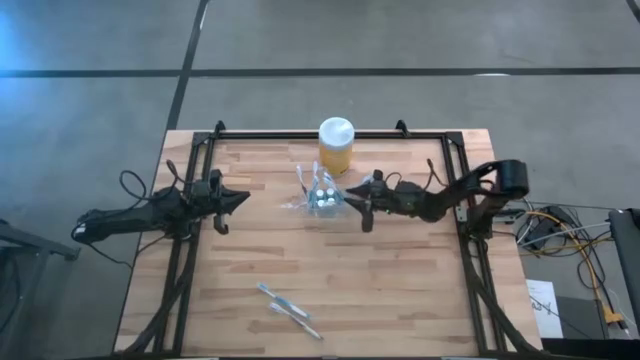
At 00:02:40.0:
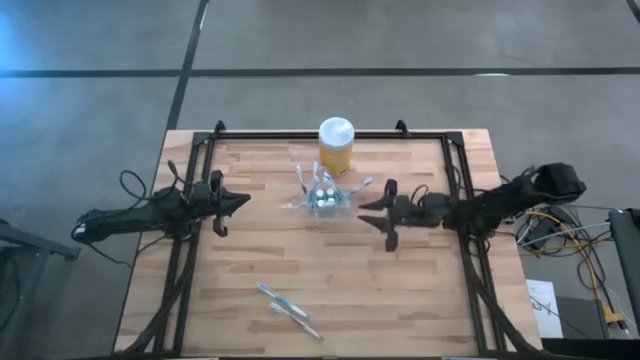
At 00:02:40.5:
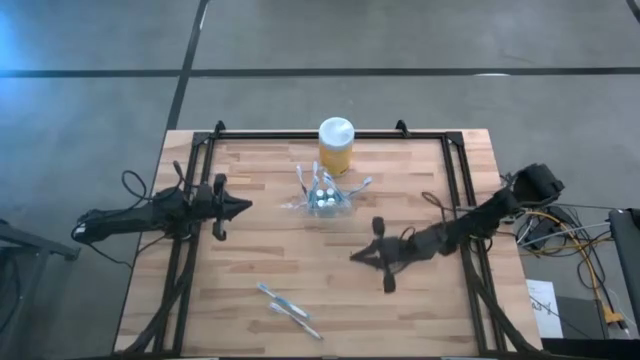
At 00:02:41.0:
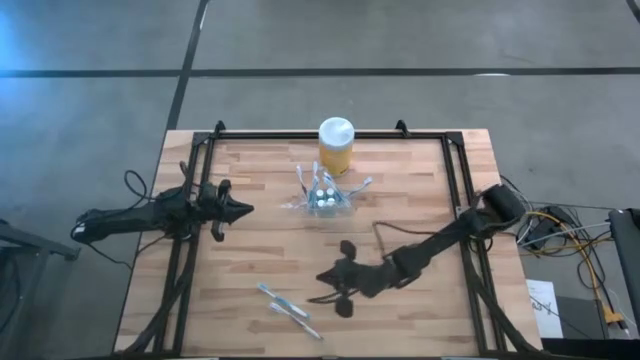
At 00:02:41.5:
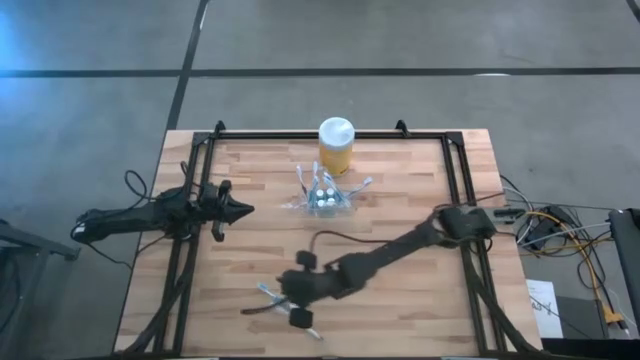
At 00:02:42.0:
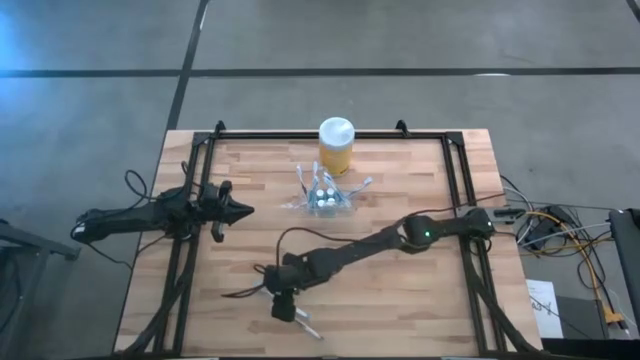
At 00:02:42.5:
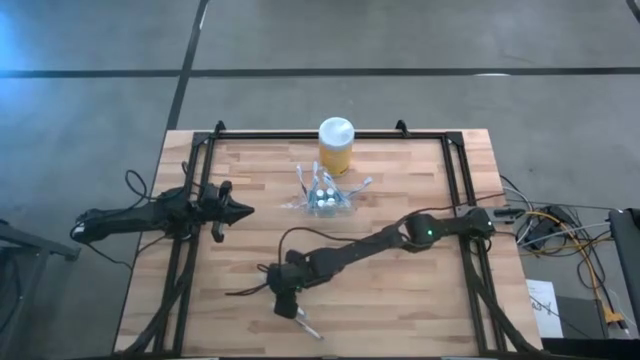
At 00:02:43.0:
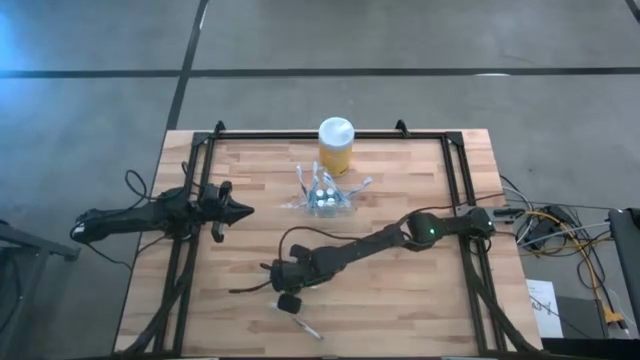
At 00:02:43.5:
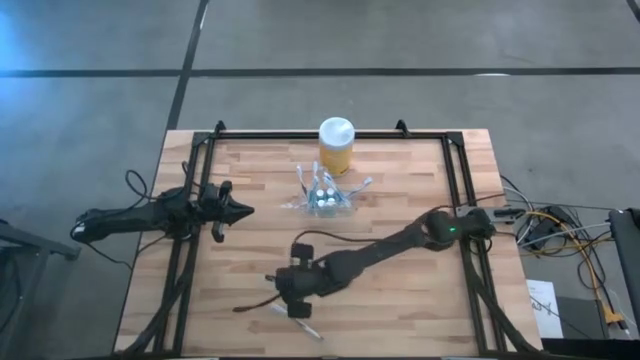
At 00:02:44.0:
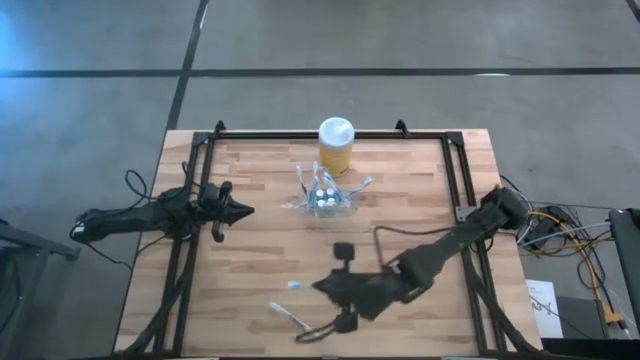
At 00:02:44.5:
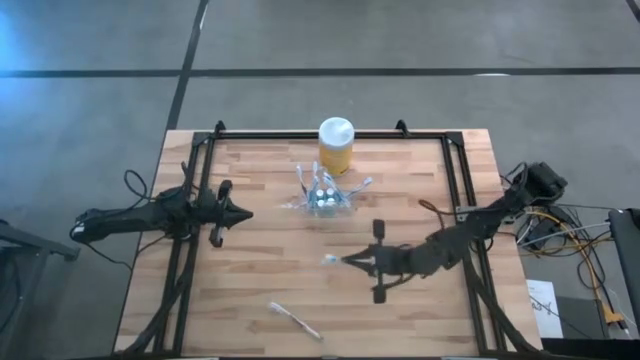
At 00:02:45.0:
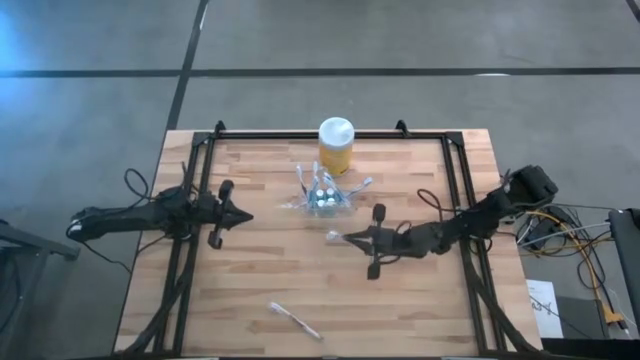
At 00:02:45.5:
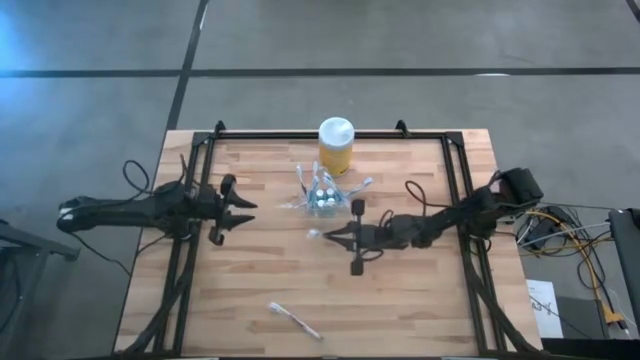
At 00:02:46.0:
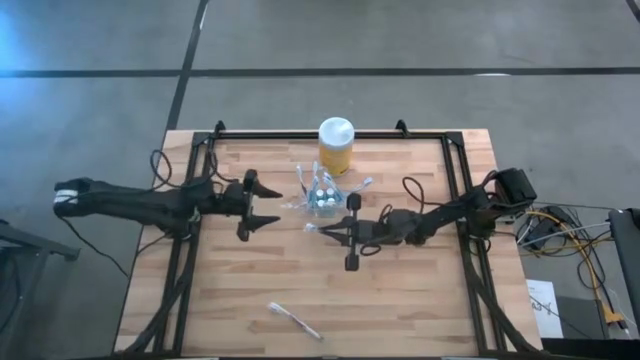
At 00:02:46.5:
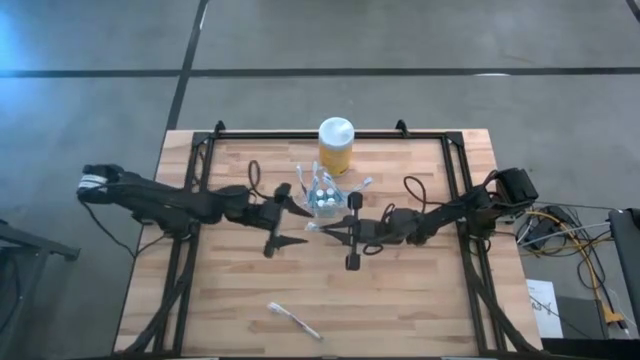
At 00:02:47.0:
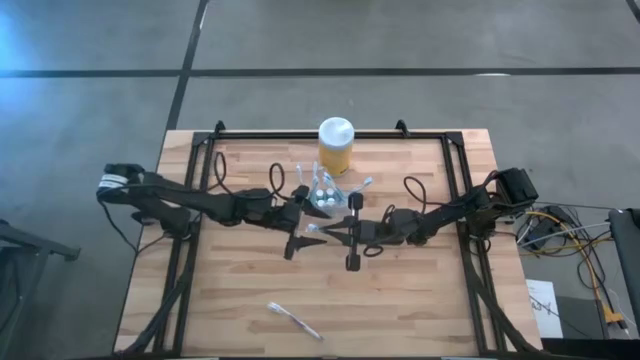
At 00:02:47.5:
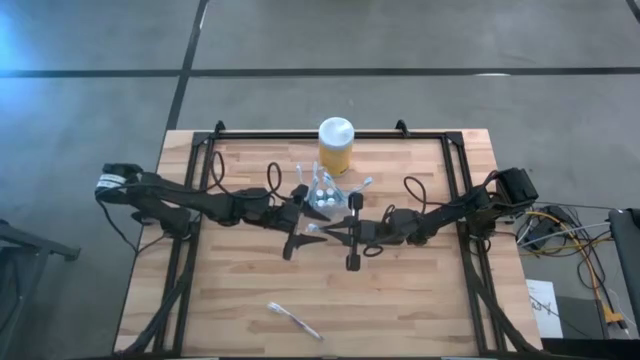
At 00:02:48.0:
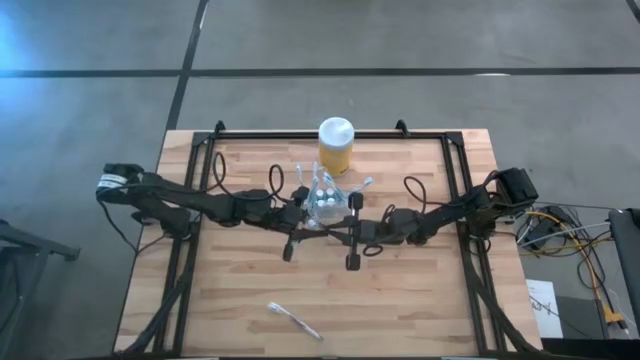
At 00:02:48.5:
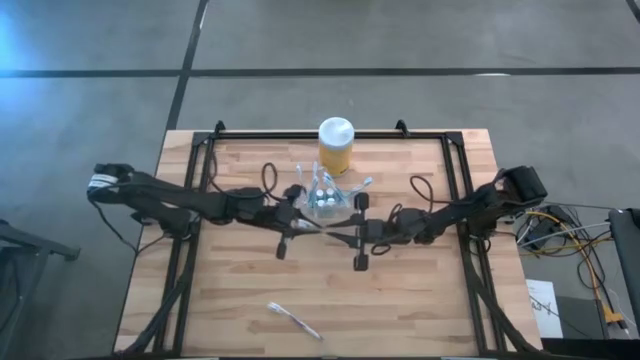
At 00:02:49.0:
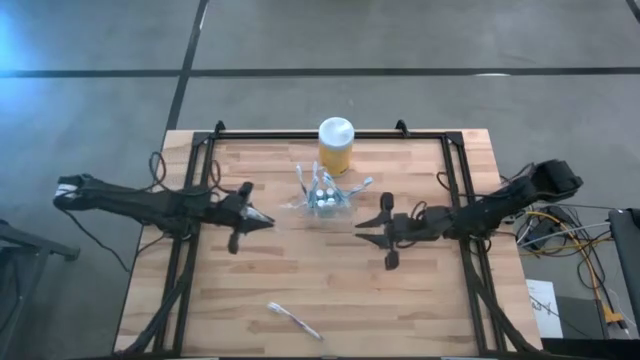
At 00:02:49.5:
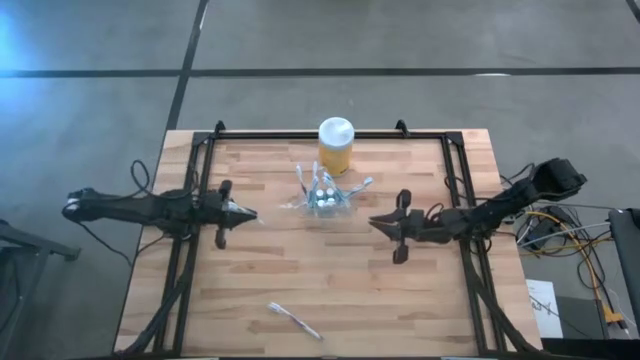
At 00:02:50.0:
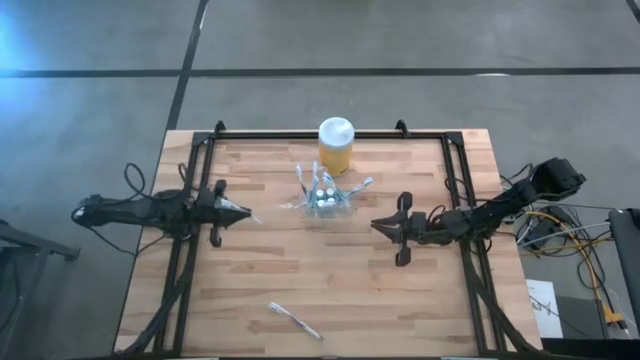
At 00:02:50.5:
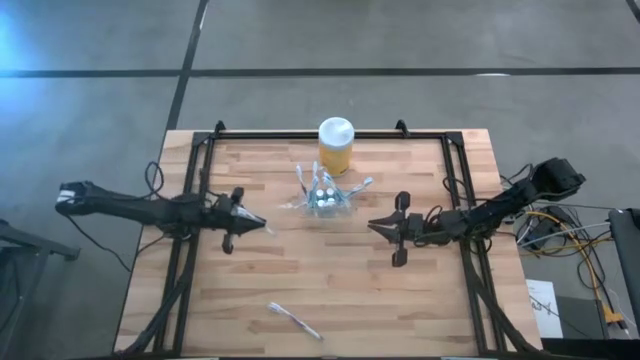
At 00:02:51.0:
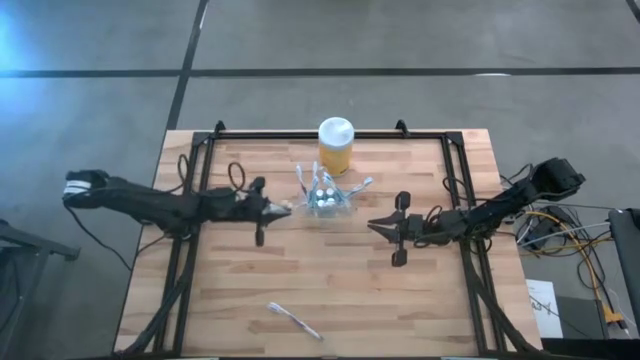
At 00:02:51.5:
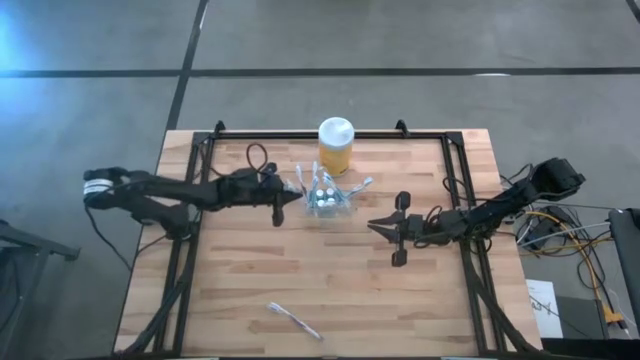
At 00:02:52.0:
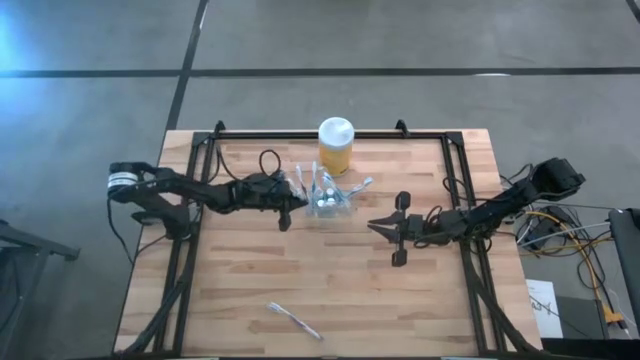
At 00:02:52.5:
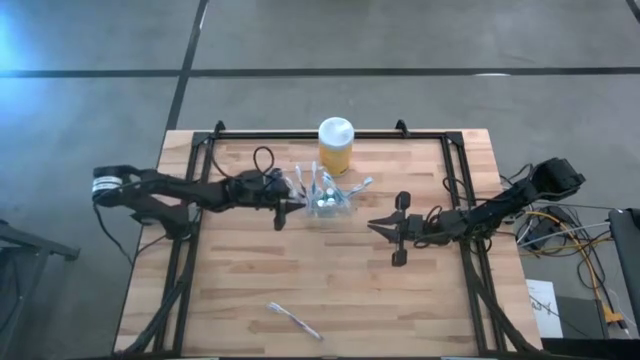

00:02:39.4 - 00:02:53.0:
Task: Pick & Place toothbrushing station
Put the blue toothbrush into the transparent organizer

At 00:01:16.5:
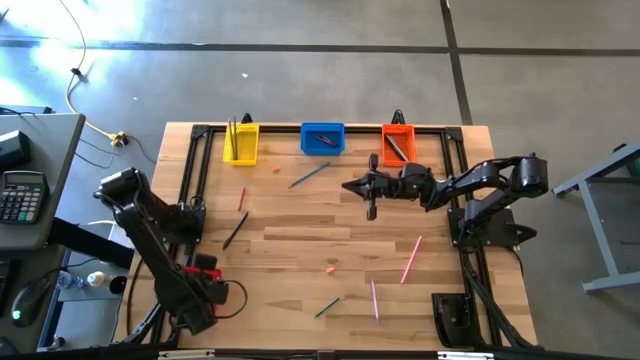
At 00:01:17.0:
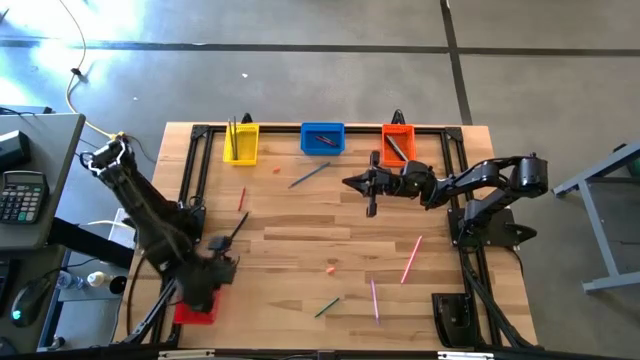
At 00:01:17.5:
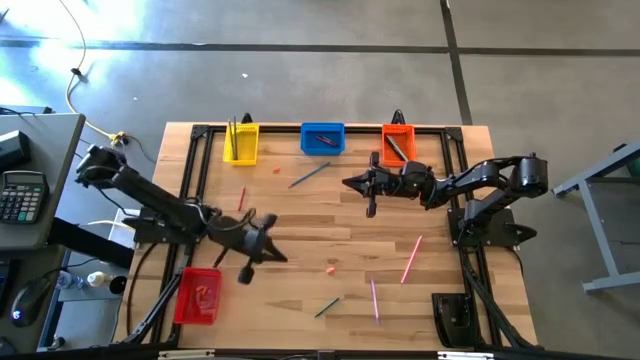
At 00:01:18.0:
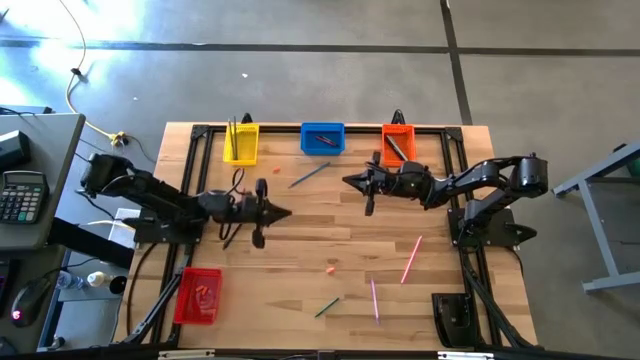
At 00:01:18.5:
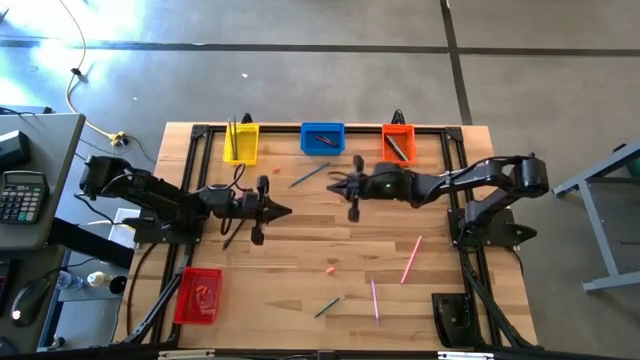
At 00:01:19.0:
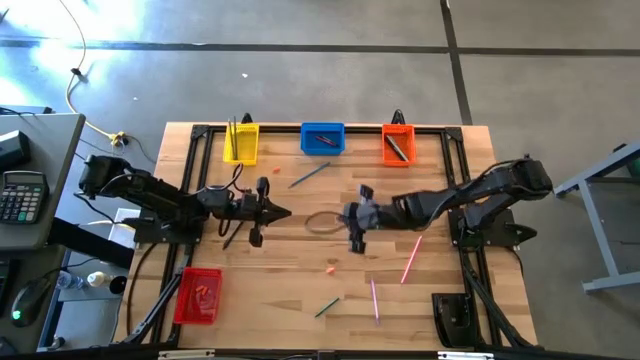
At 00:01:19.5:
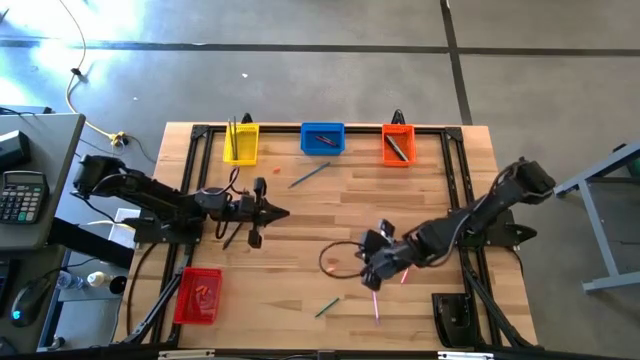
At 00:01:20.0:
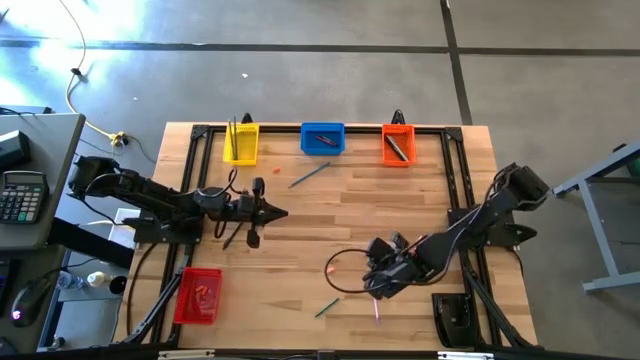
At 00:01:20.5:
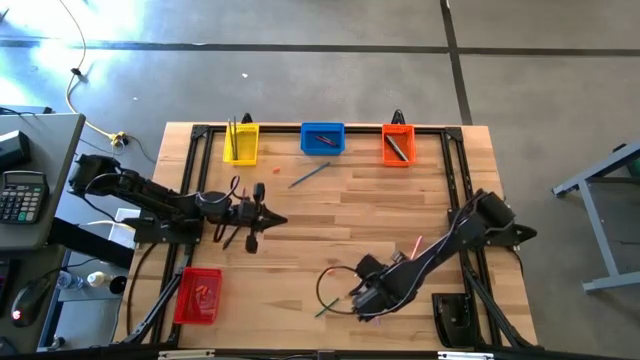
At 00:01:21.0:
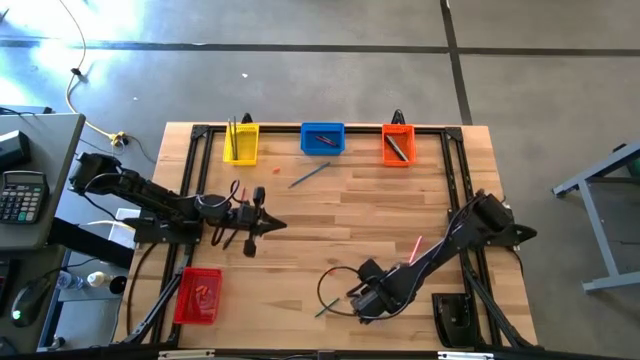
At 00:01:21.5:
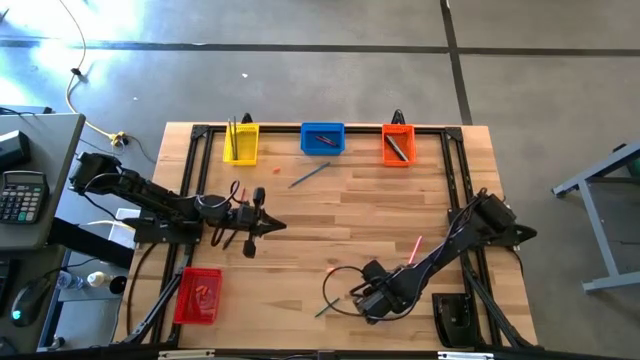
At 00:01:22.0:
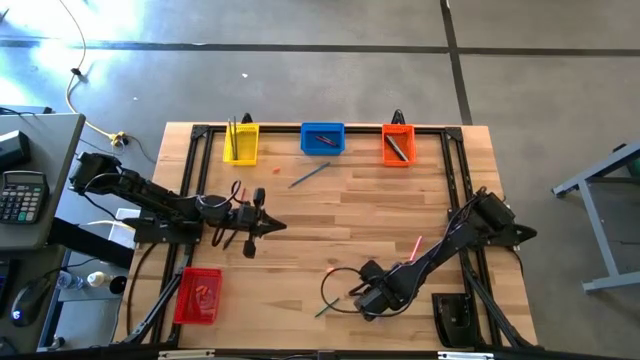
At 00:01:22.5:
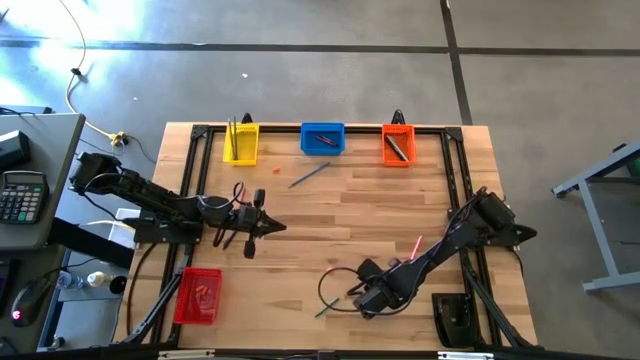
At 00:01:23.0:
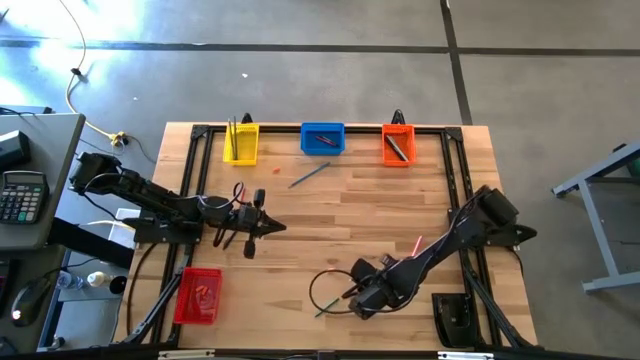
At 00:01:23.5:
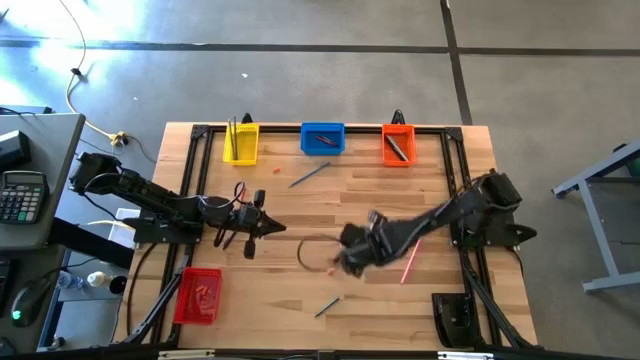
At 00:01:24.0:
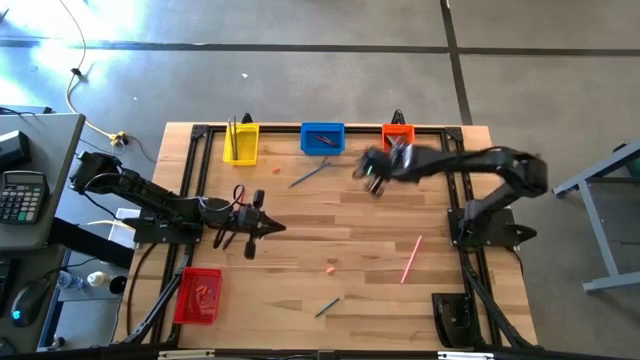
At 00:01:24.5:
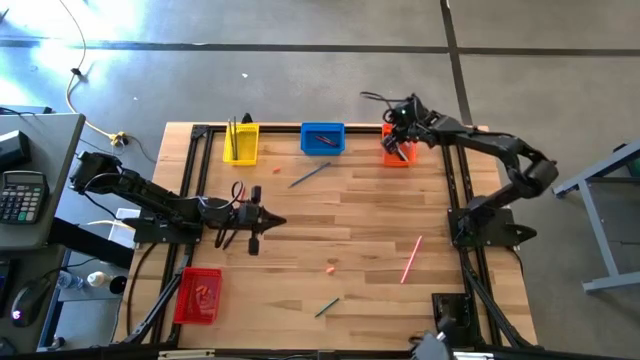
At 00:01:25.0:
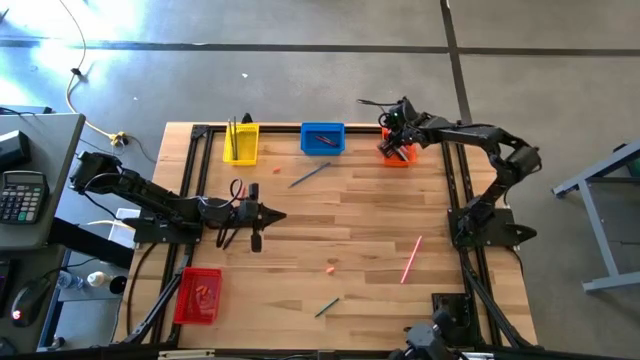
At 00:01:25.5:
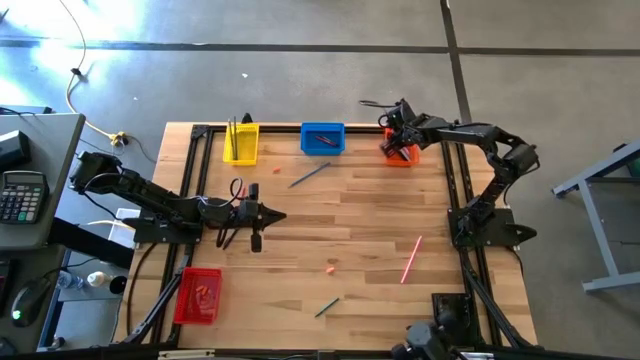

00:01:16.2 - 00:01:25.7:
Task: Sort crayons/erasers/pens/pencils in bins
Put the violet pen into the orange bin
